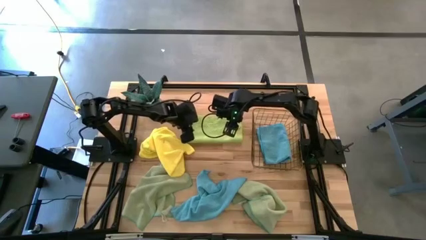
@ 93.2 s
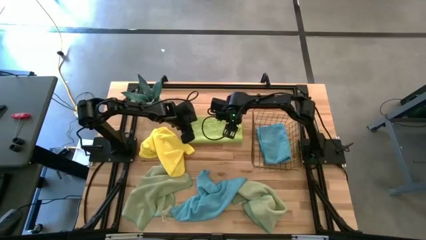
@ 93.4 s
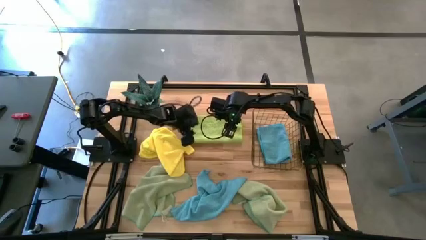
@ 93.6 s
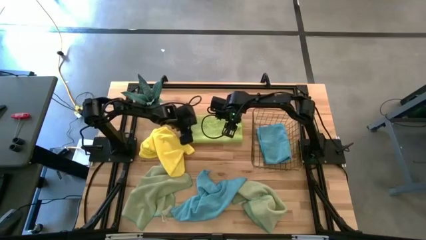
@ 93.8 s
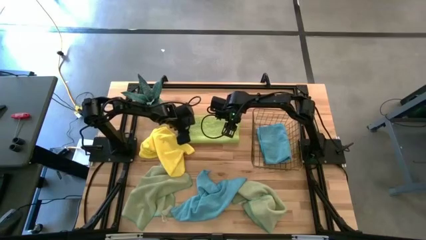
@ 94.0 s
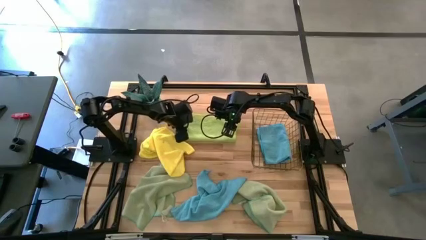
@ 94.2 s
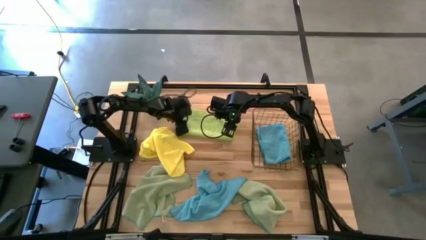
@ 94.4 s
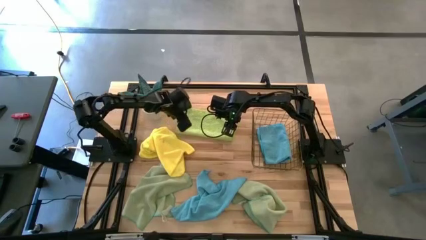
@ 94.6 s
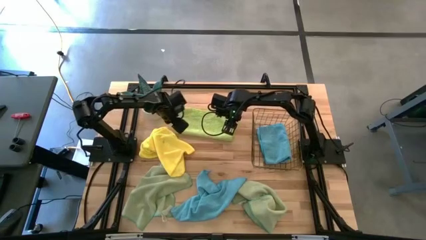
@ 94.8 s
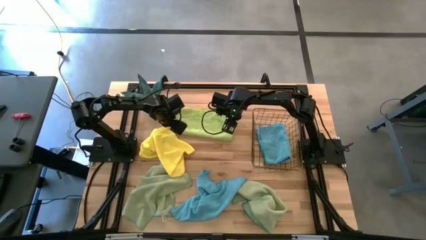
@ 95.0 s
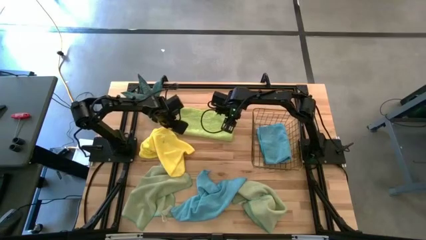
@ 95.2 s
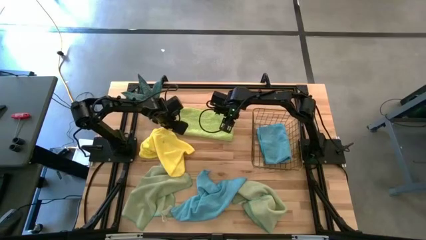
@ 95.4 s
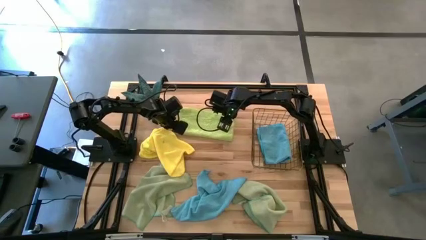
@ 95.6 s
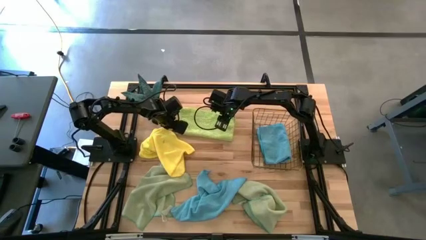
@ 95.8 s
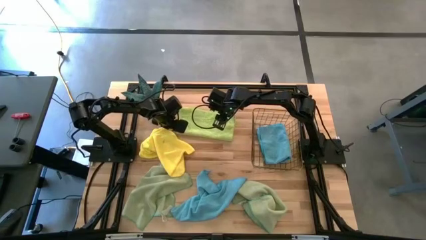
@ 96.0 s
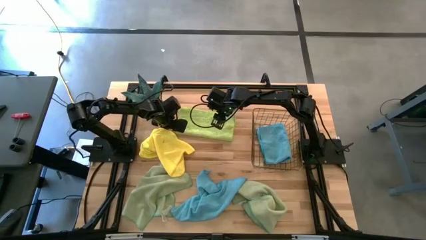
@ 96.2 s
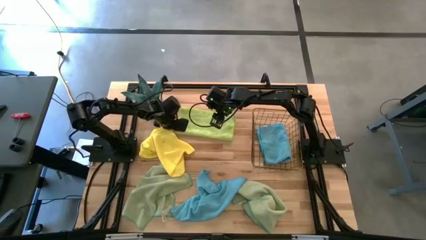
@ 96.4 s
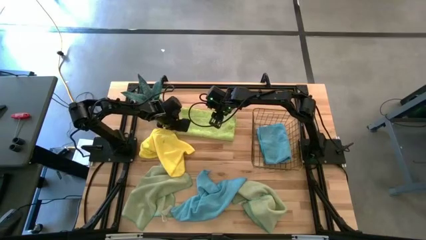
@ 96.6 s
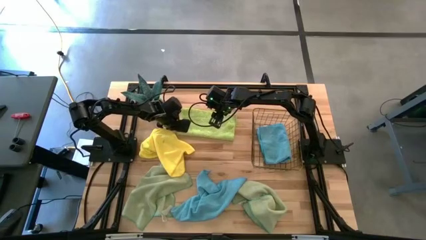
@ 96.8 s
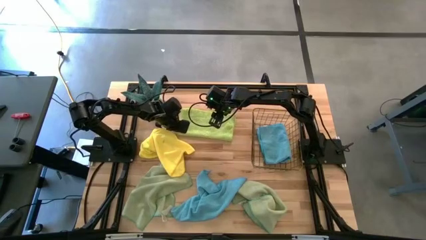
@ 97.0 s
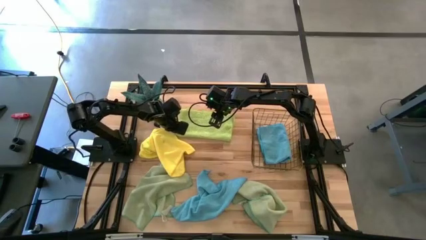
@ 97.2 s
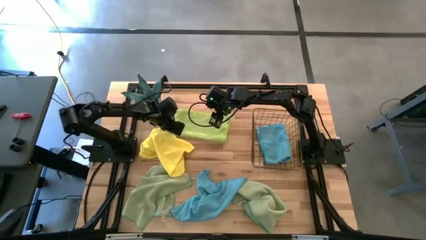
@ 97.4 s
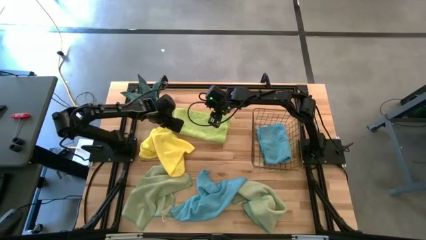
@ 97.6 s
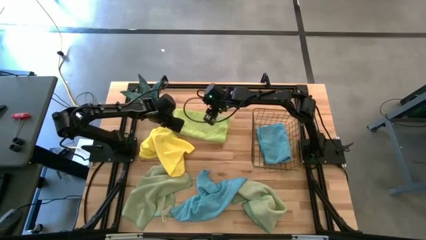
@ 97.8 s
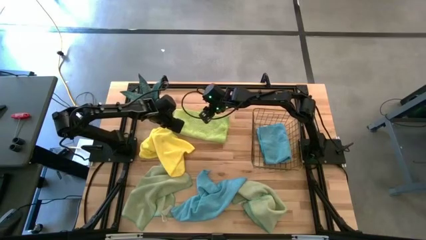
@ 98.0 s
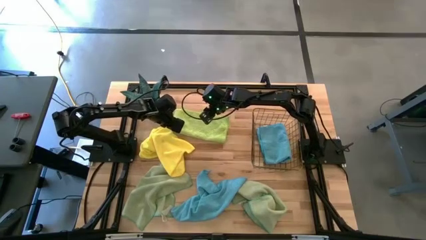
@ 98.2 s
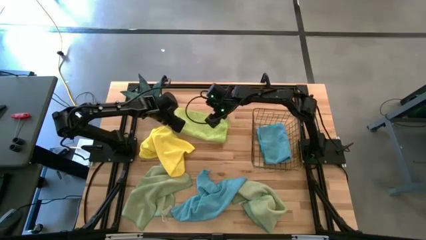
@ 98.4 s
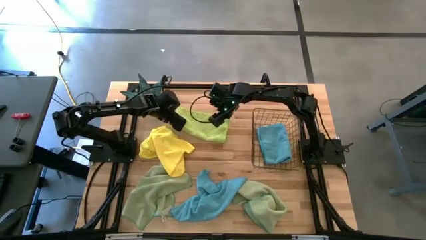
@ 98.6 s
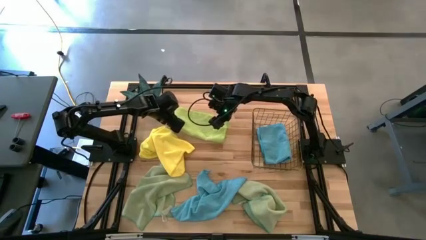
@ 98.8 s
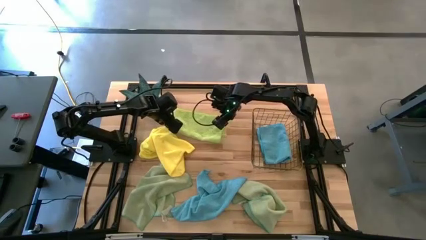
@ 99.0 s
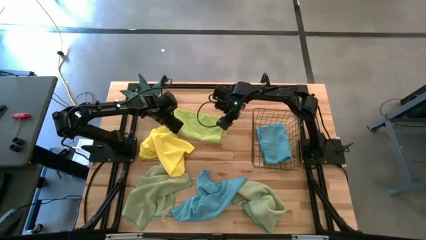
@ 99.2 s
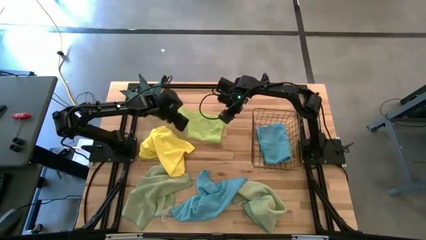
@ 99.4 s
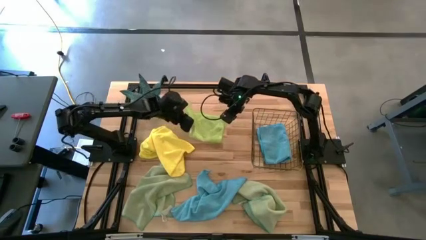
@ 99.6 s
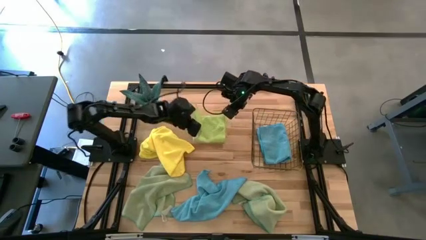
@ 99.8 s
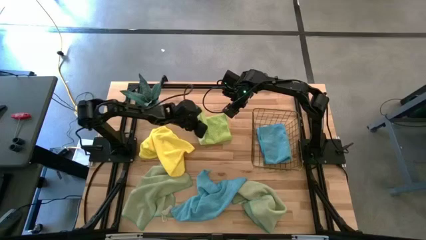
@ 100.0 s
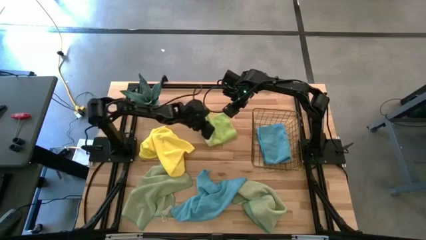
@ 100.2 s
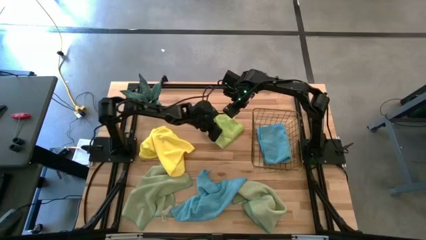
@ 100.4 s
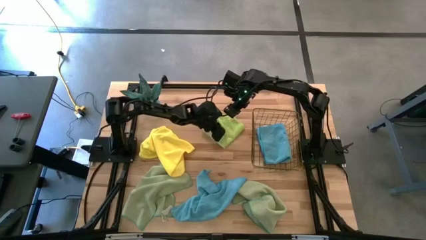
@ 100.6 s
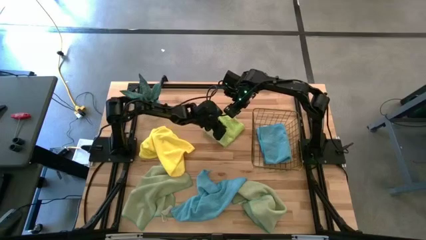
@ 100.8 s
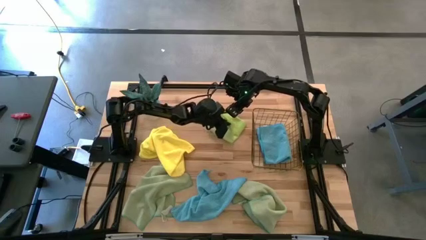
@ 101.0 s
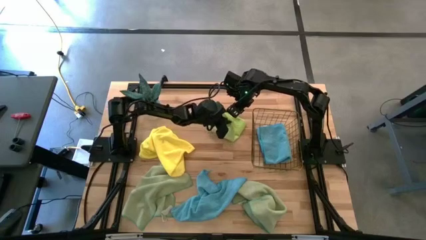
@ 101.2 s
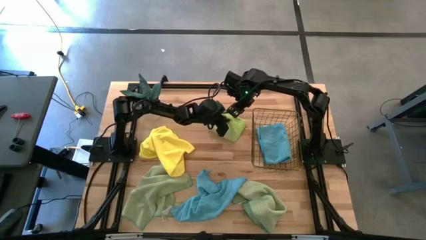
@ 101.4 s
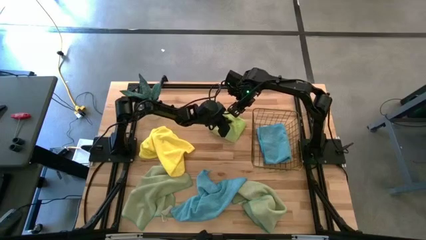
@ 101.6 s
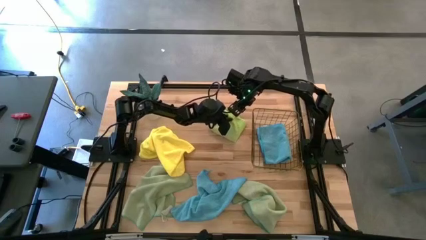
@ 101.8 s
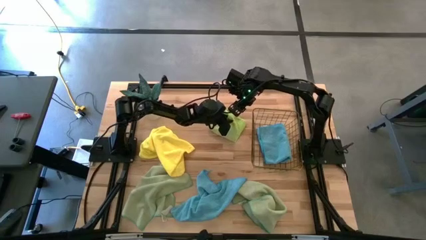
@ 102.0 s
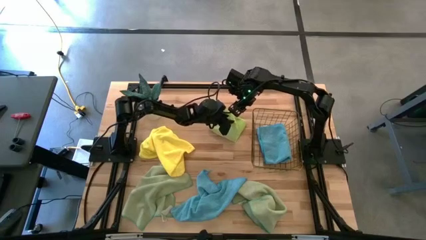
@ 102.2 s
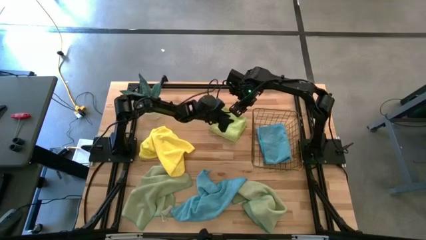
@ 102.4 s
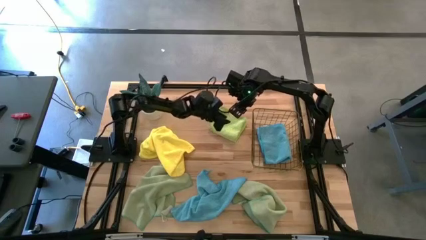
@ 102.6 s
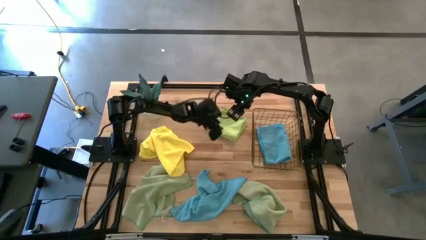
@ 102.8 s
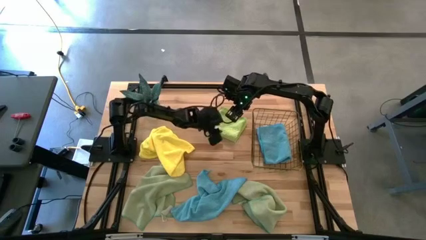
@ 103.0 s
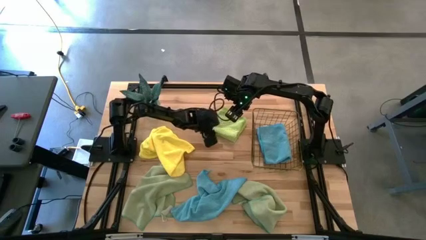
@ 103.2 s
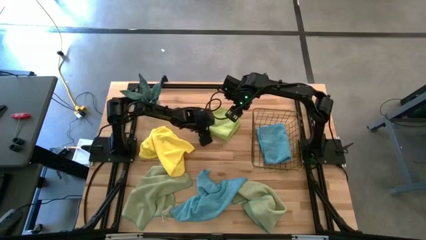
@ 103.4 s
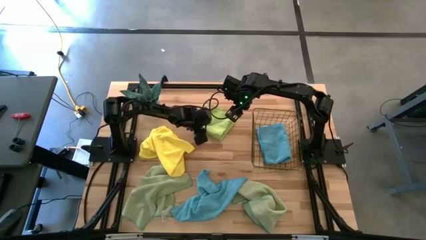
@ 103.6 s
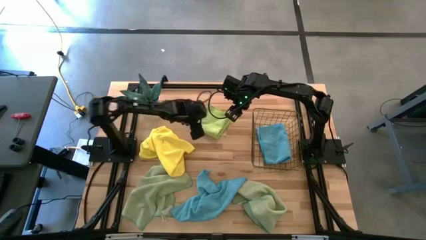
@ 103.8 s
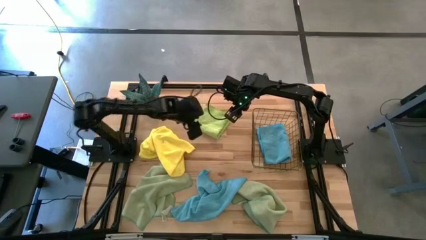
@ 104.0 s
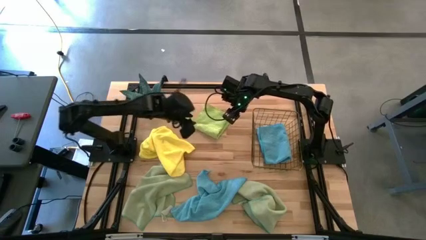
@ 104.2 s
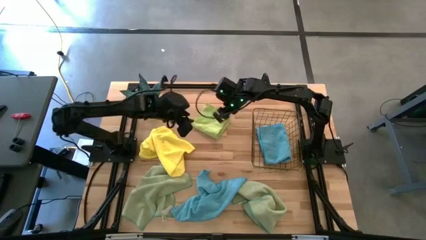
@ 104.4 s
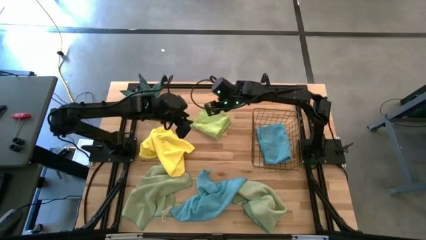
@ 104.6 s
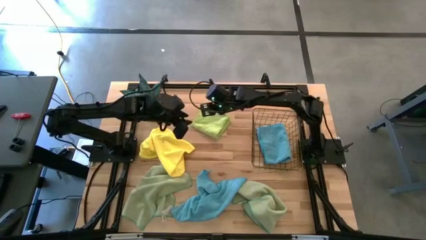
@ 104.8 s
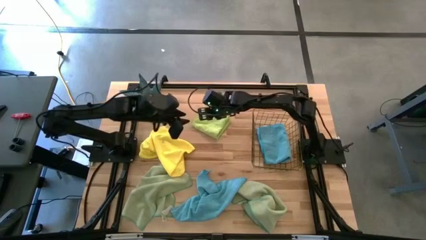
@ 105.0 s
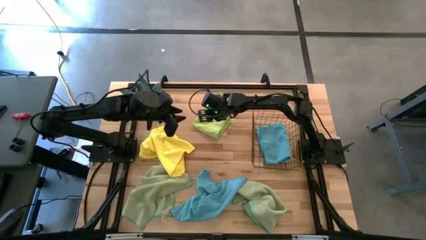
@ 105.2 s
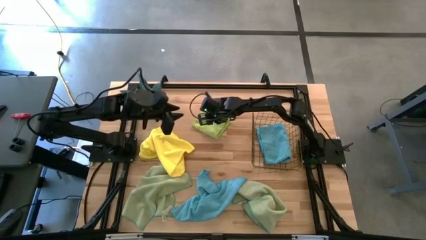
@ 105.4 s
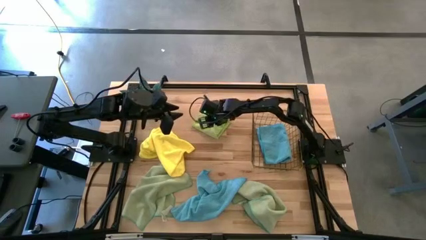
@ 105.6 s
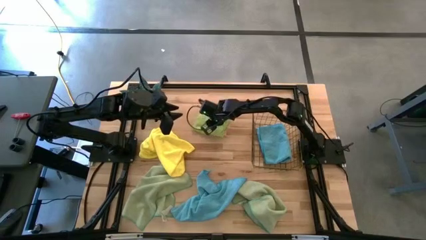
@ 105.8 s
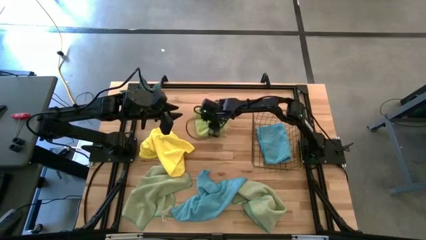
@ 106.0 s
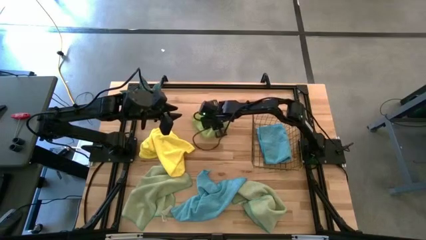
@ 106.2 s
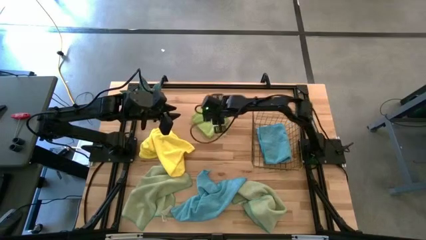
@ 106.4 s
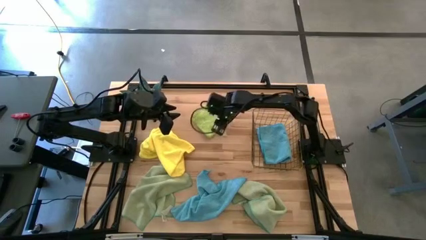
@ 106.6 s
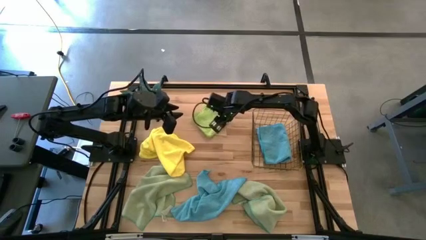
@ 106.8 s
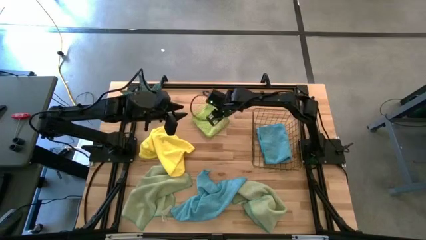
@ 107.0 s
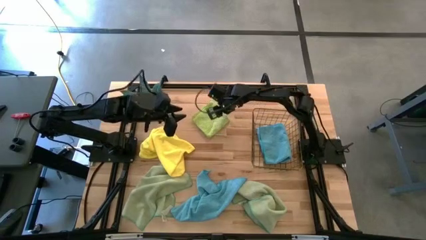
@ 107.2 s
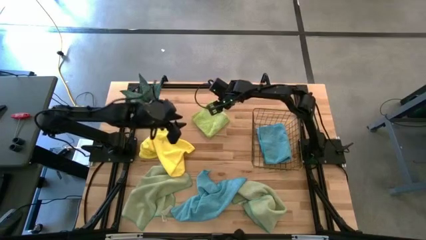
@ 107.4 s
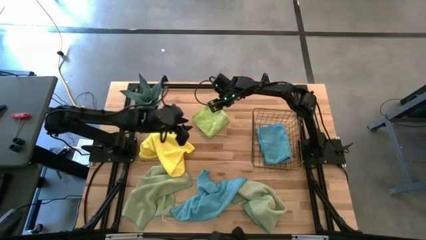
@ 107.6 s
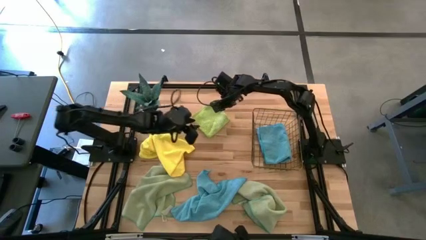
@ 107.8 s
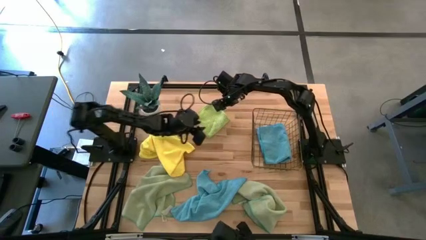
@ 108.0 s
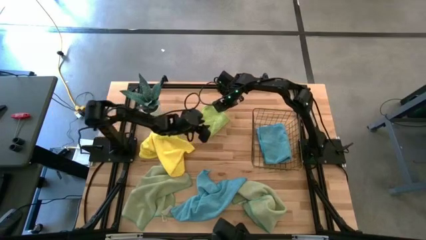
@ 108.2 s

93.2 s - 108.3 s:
Task: Fold microfiber towels
Fold the light green microfiber cloth
